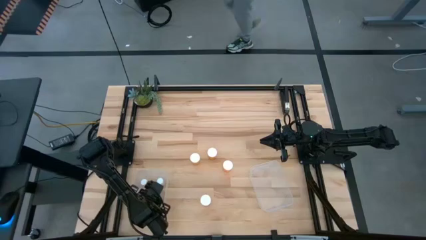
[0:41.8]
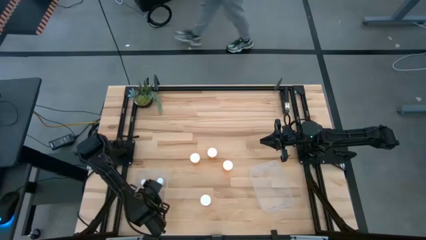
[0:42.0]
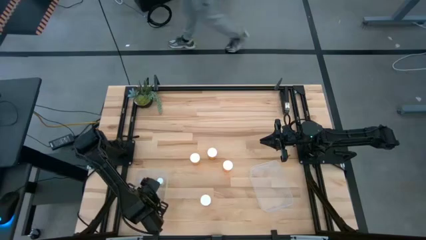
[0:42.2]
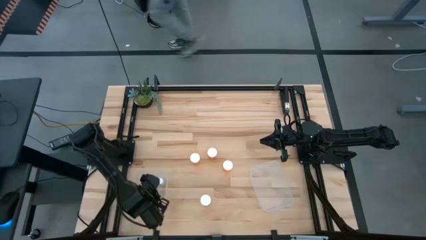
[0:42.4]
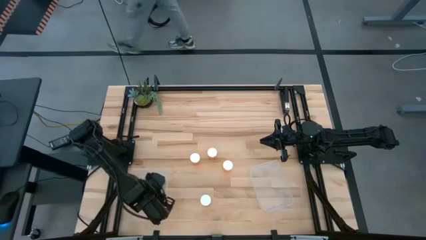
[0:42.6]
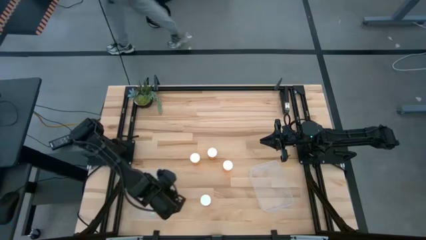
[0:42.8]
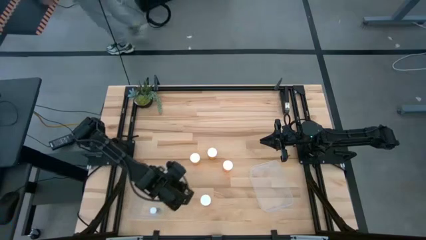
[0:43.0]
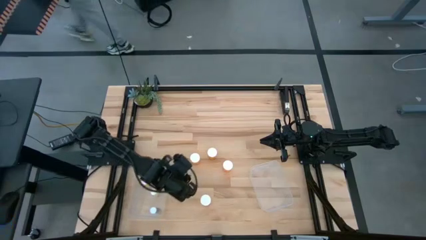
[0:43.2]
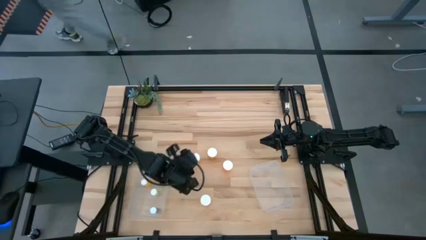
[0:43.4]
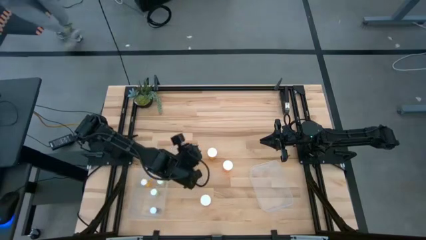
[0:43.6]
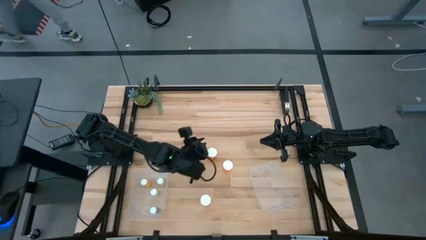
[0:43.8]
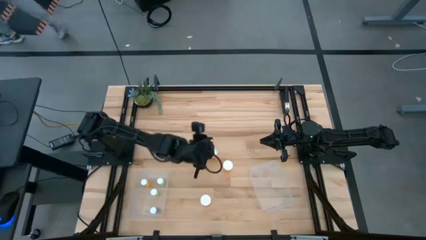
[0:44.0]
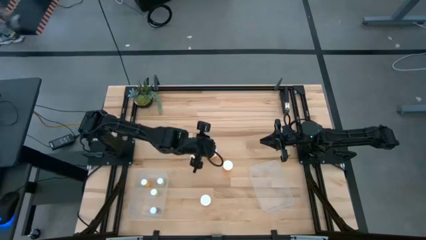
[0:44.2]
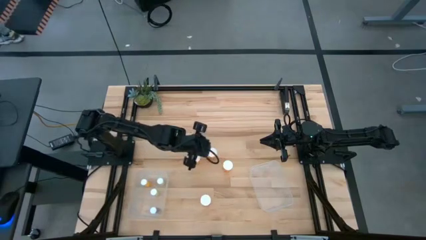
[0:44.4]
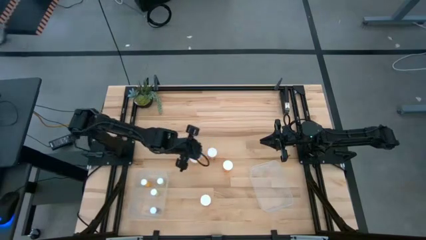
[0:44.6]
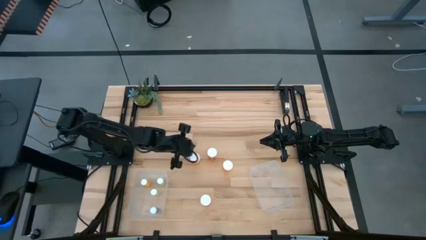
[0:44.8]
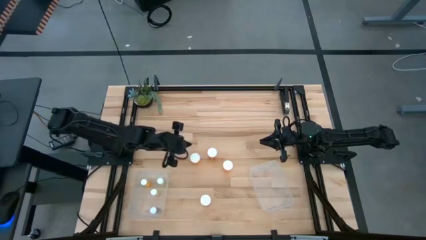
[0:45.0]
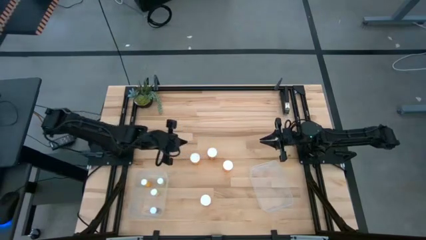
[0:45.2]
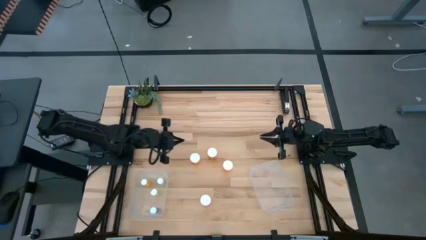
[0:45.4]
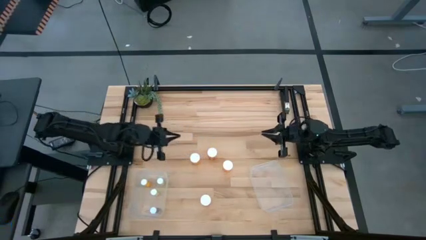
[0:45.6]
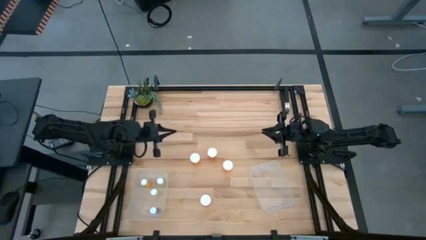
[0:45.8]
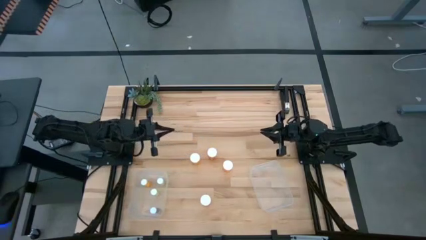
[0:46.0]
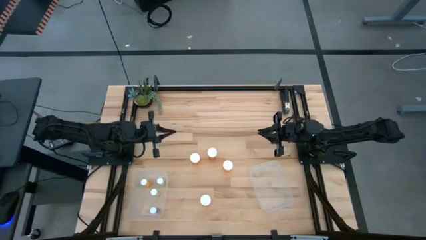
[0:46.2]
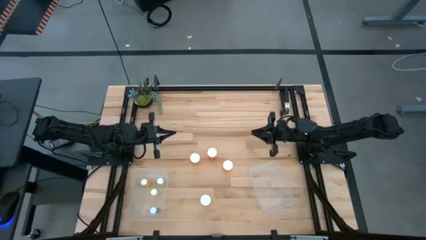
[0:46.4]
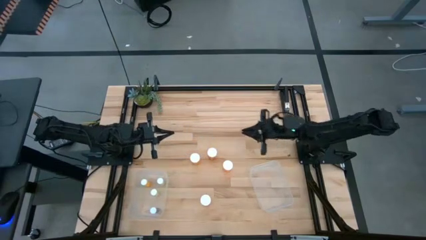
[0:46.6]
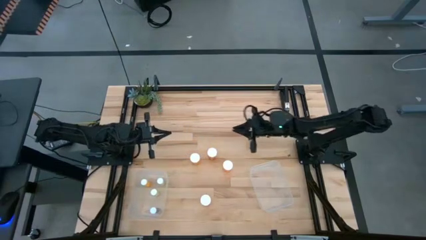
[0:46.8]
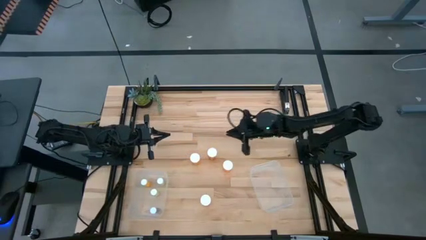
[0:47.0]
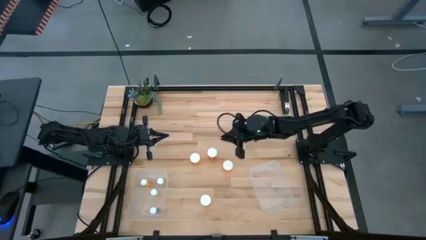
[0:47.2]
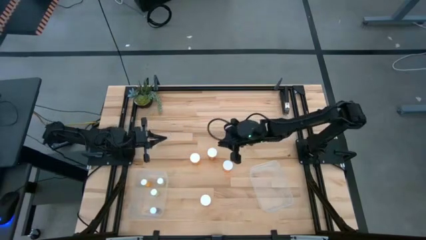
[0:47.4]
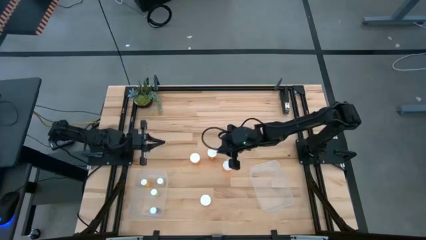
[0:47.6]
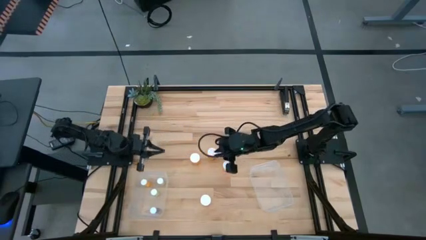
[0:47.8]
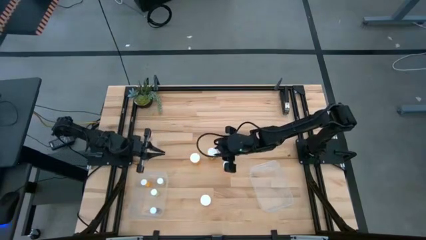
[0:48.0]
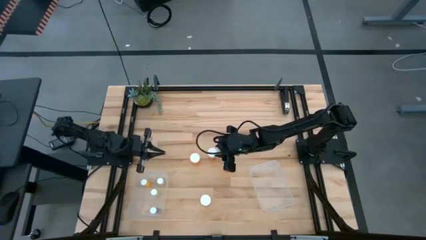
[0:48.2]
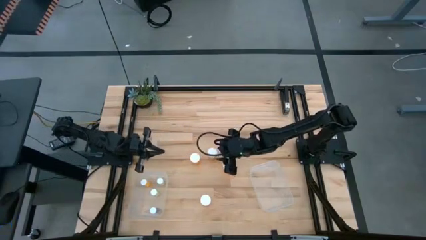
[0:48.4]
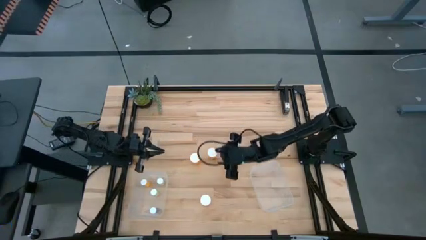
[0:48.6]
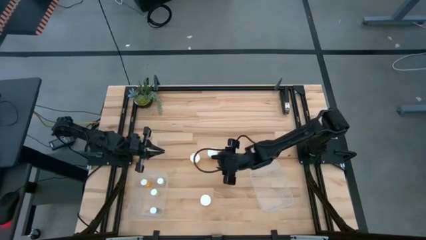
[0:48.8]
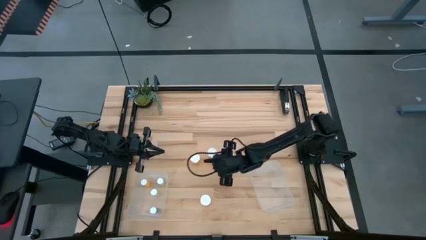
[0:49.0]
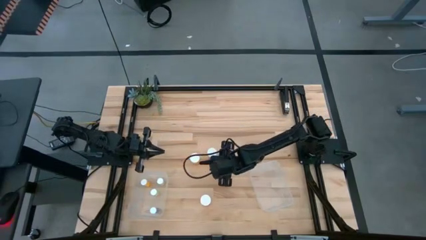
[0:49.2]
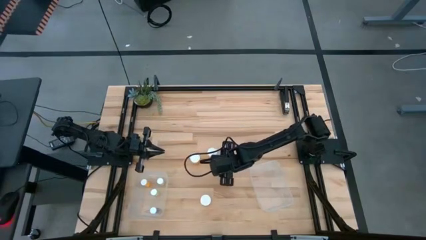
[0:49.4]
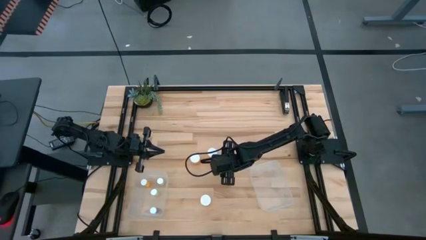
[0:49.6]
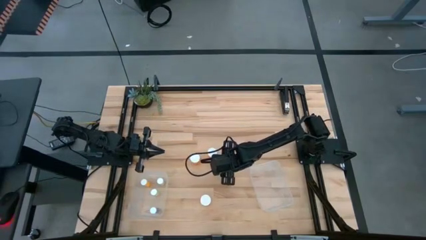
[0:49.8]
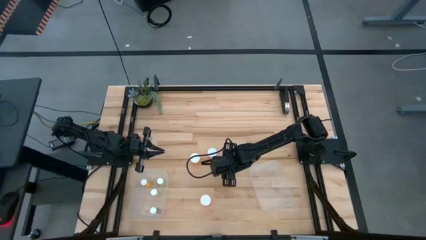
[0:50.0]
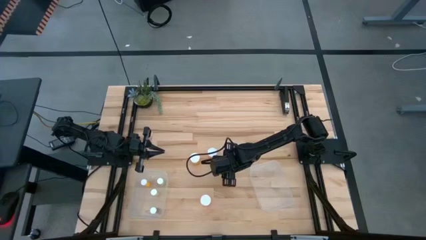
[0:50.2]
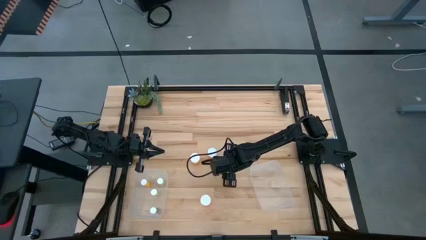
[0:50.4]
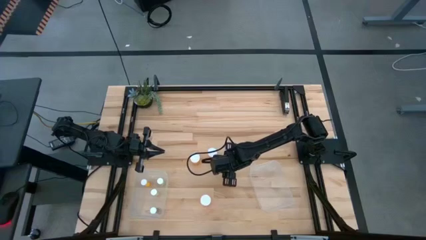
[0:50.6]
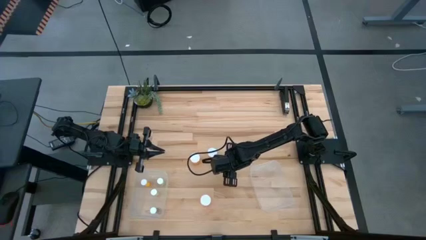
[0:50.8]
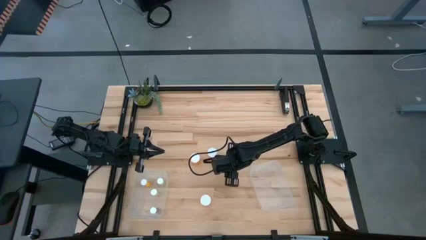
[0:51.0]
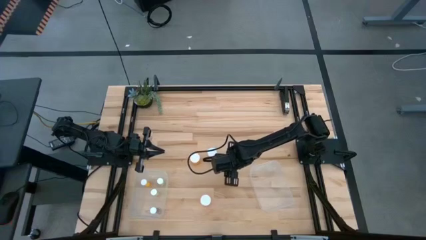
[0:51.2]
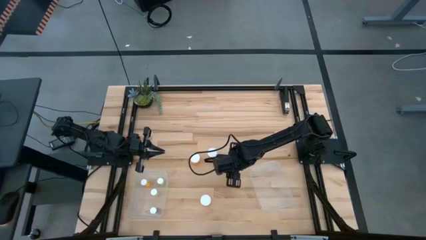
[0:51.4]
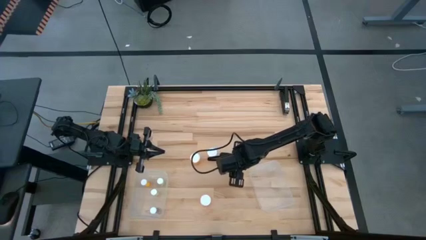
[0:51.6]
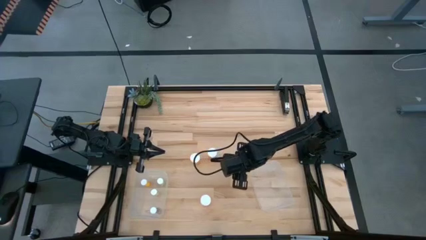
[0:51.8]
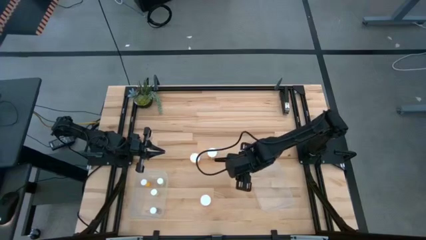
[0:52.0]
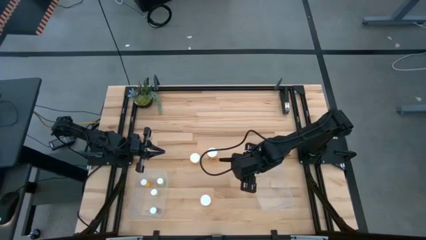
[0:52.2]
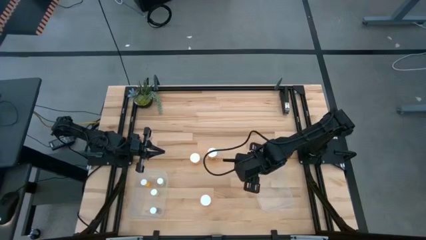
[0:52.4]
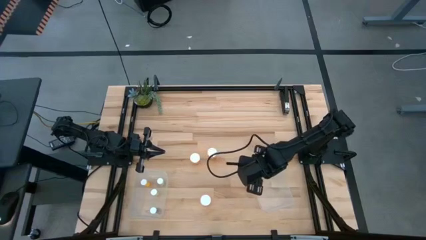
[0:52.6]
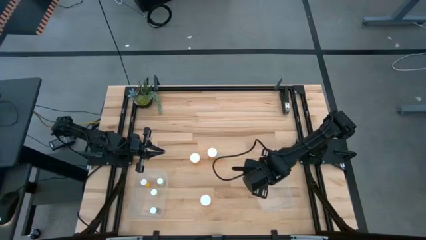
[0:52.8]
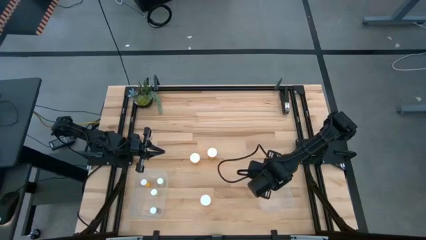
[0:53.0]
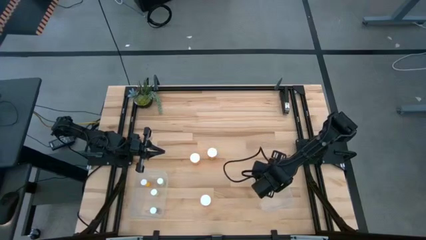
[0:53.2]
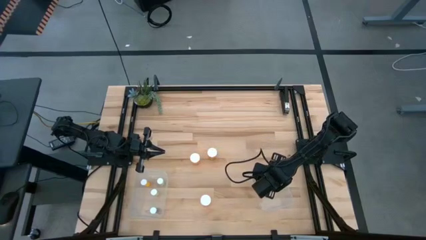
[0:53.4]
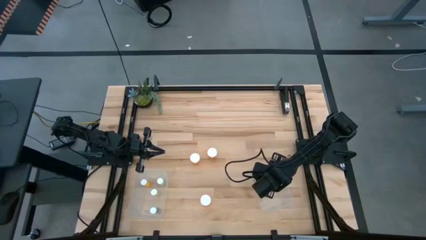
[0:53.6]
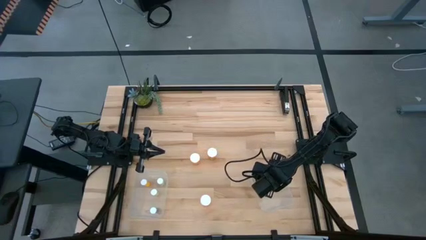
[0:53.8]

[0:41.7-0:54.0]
Task: Pick and place medicine bottles into bin by pill shape (circle, oval)
Put the large orange pill bottle into the right transparent bin

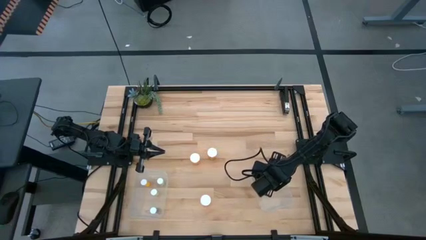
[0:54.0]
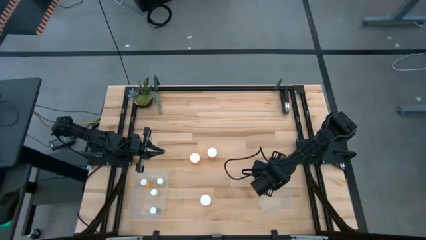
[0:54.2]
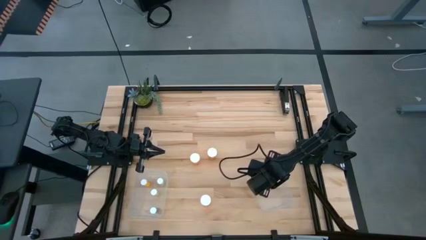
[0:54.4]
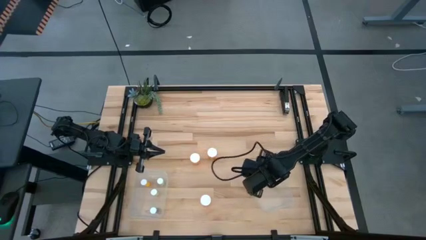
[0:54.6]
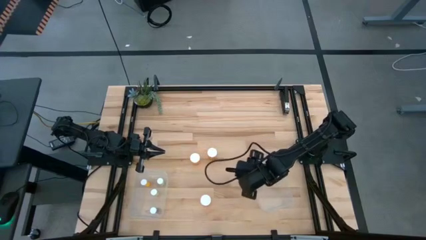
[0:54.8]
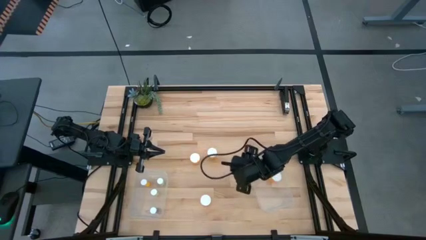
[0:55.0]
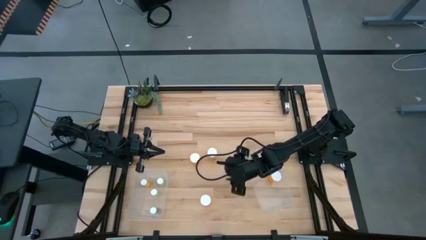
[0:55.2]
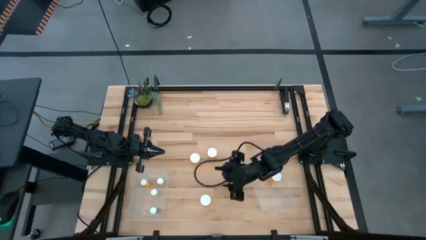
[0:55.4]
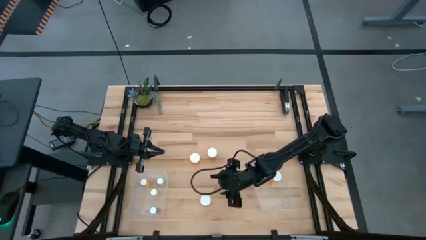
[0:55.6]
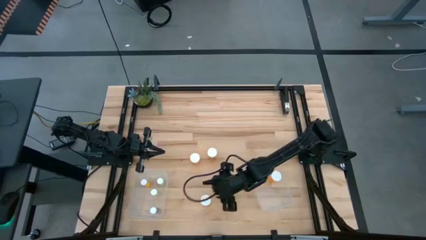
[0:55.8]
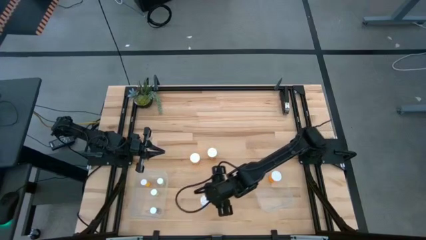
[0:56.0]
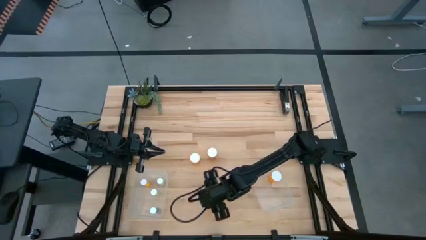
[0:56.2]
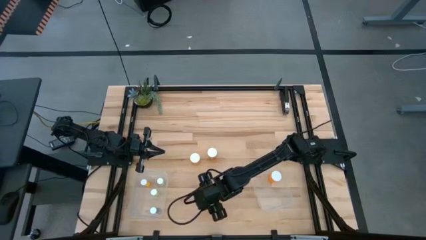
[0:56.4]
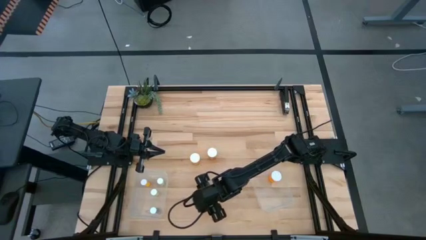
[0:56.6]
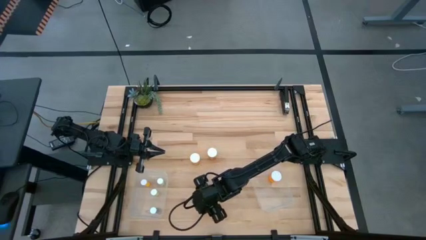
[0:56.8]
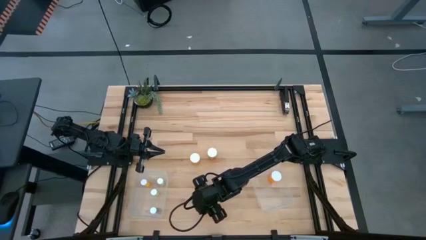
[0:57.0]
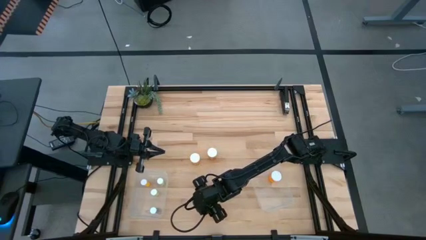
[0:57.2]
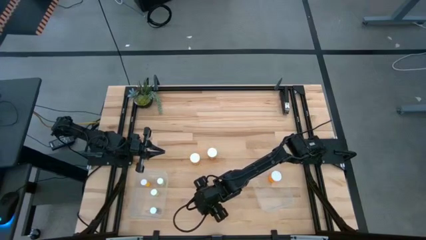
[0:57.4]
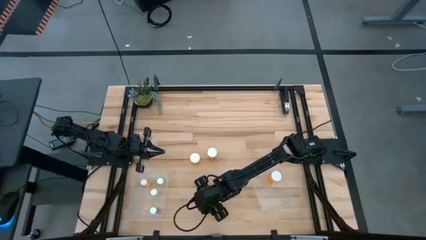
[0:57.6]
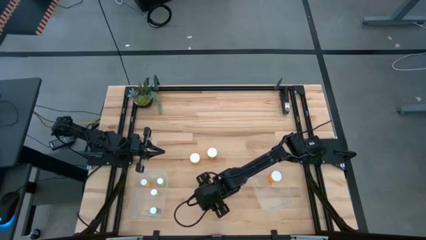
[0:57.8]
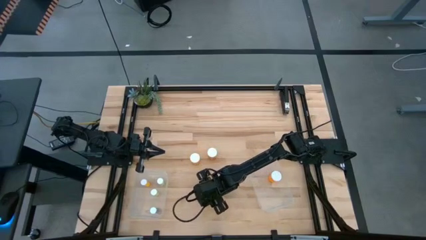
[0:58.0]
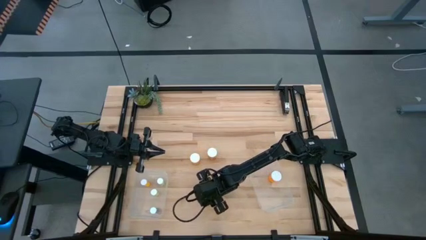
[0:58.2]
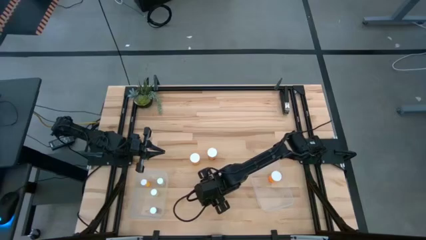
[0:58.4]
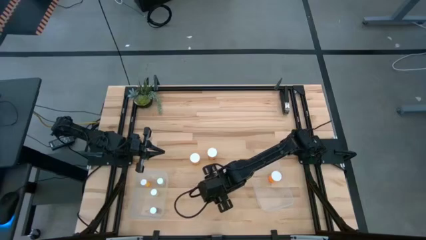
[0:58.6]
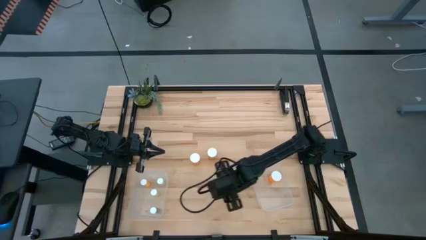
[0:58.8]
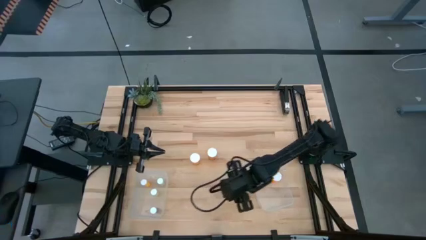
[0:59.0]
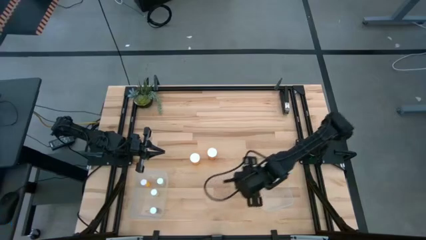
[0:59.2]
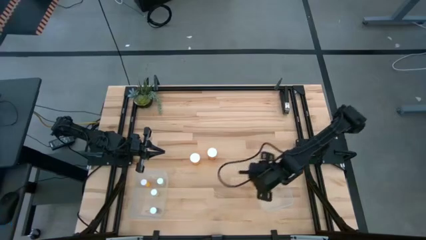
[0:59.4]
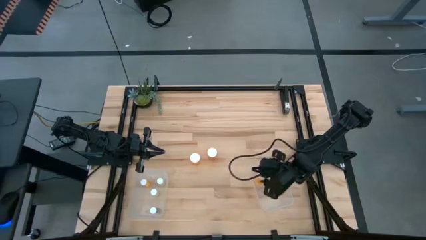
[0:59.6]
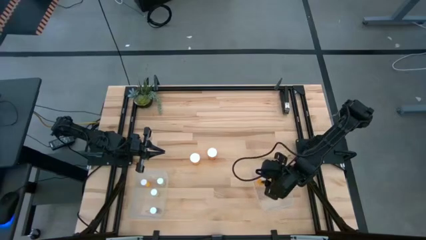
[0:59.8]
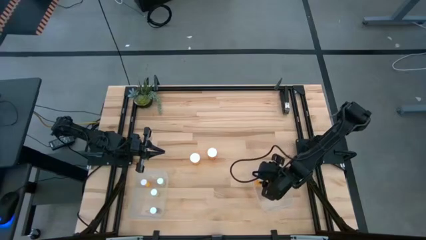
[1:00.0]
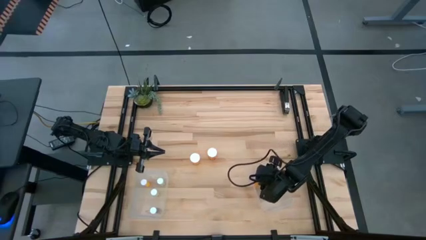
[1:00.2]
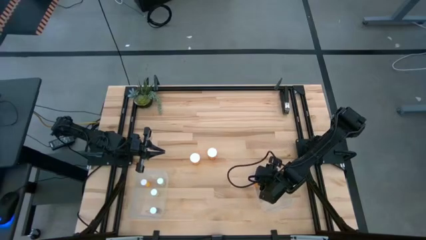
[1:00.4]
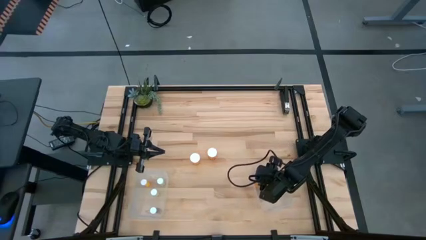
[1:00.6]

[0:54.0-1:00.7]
Put the large orange pill bottle into the right transparent bin
